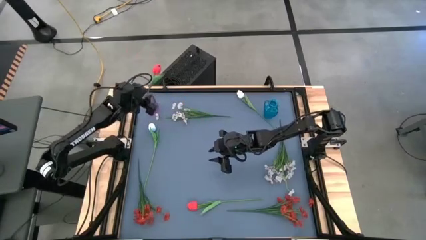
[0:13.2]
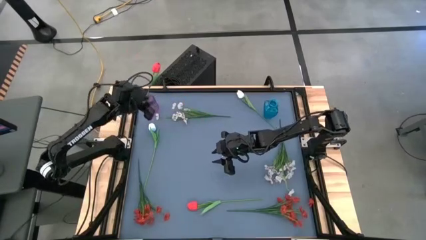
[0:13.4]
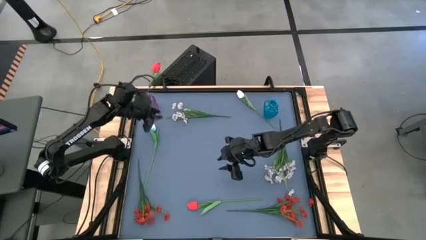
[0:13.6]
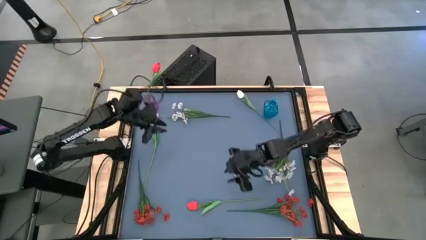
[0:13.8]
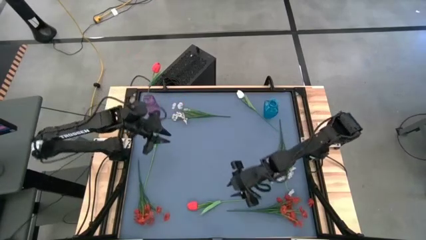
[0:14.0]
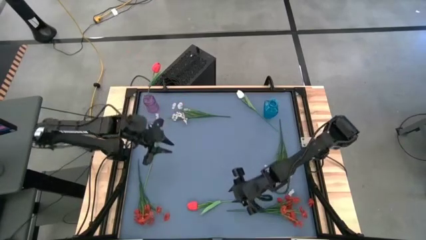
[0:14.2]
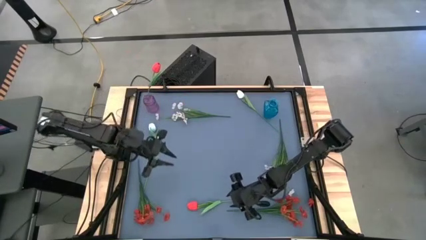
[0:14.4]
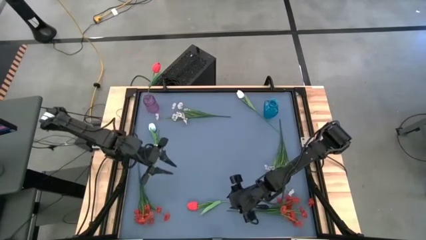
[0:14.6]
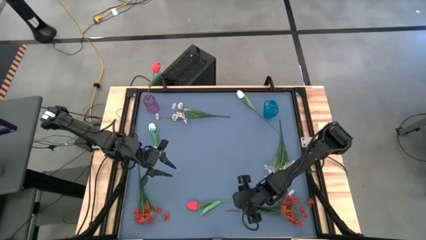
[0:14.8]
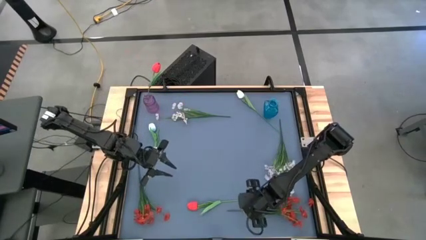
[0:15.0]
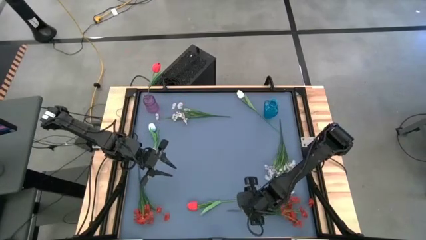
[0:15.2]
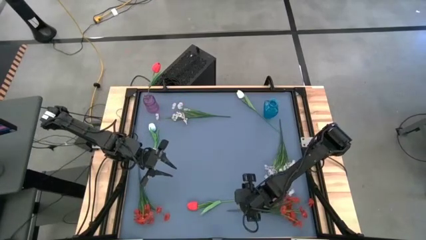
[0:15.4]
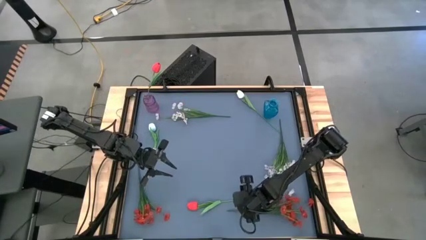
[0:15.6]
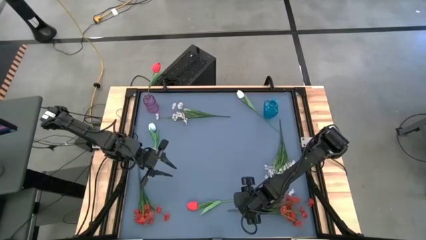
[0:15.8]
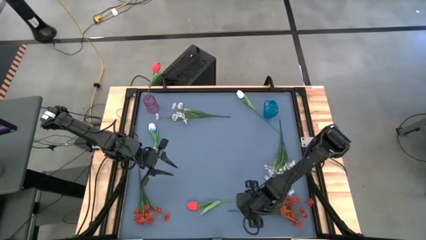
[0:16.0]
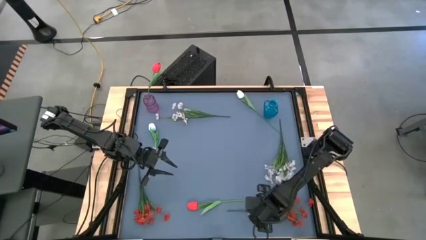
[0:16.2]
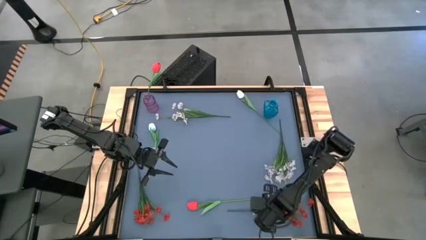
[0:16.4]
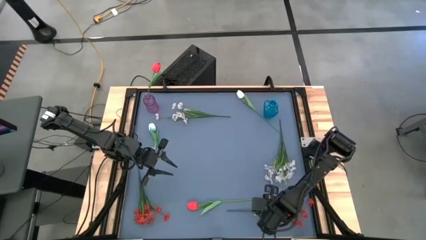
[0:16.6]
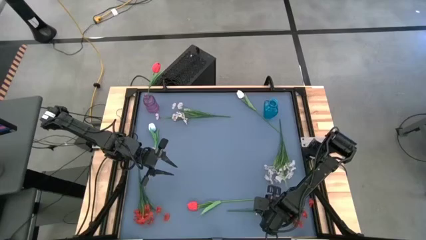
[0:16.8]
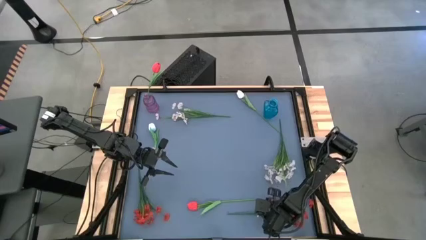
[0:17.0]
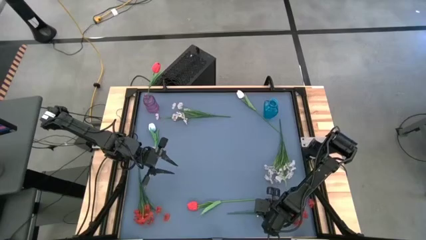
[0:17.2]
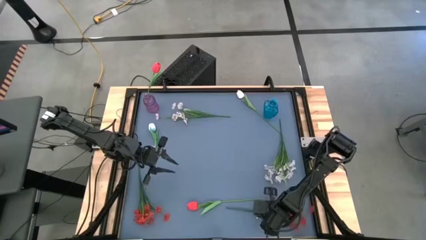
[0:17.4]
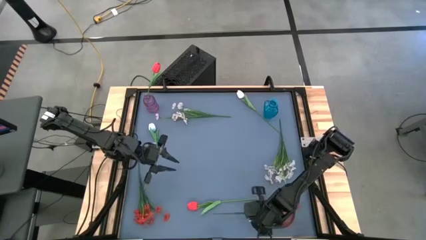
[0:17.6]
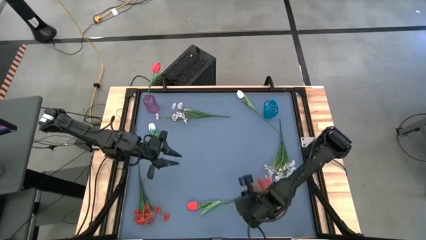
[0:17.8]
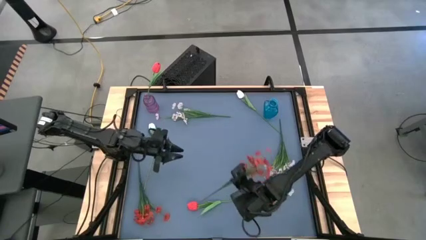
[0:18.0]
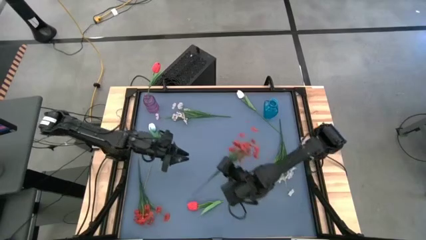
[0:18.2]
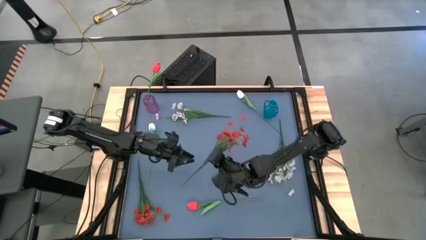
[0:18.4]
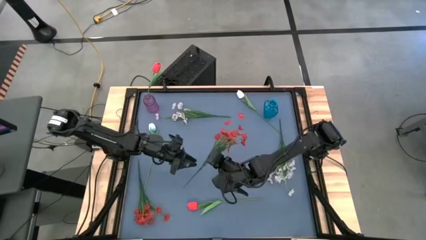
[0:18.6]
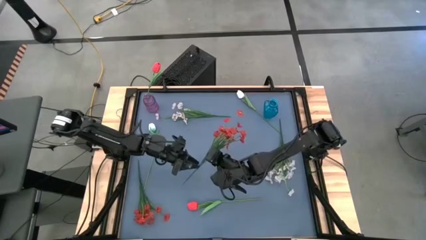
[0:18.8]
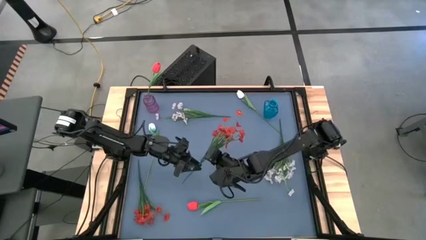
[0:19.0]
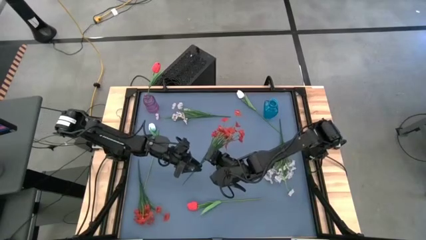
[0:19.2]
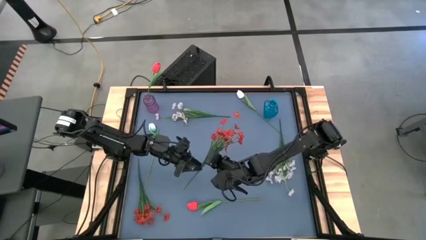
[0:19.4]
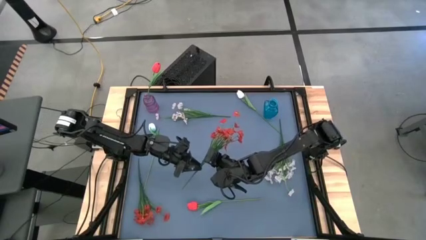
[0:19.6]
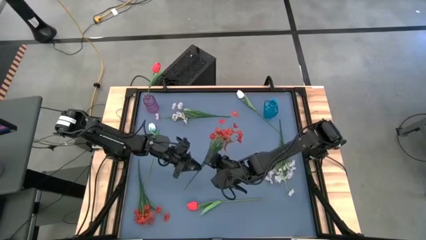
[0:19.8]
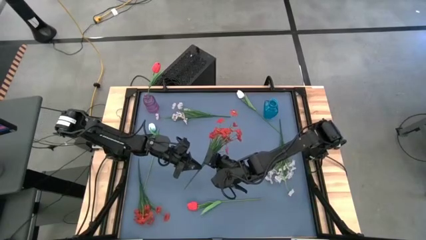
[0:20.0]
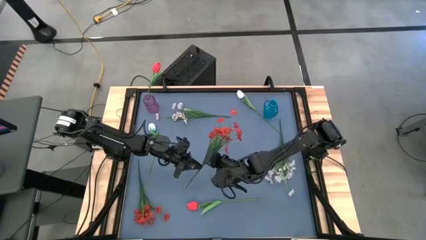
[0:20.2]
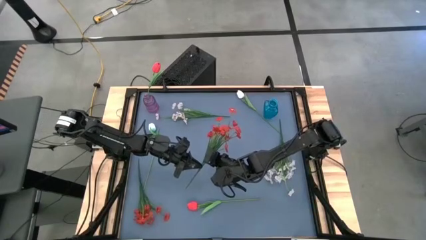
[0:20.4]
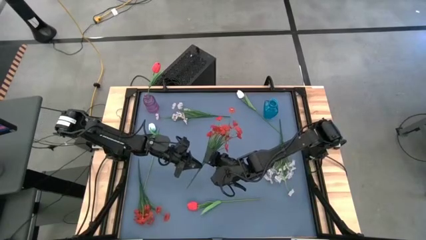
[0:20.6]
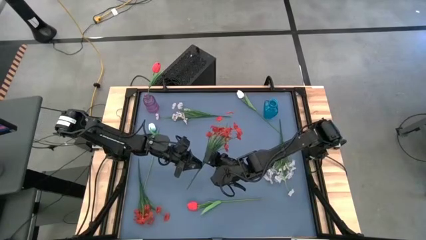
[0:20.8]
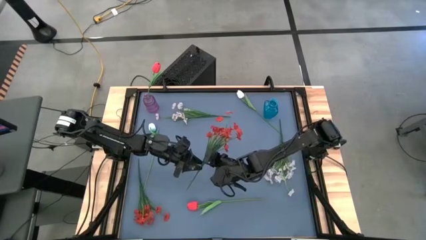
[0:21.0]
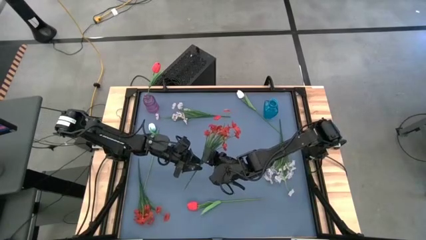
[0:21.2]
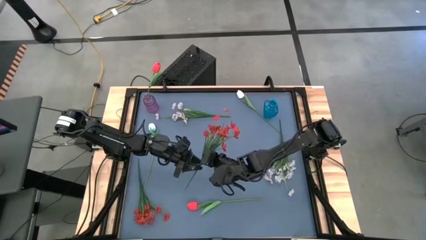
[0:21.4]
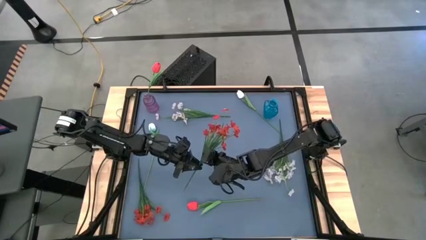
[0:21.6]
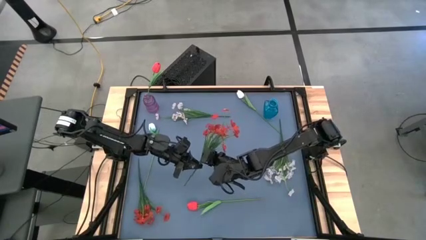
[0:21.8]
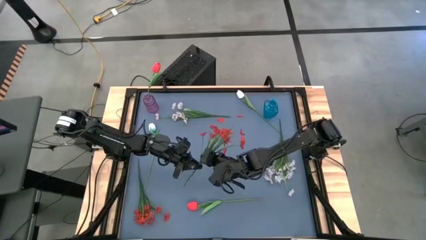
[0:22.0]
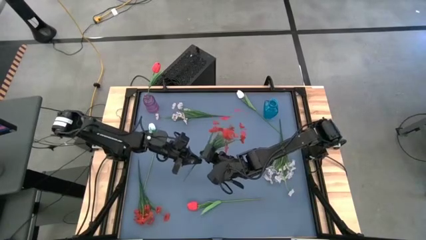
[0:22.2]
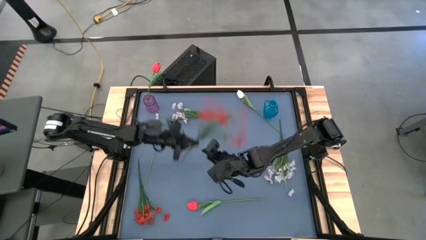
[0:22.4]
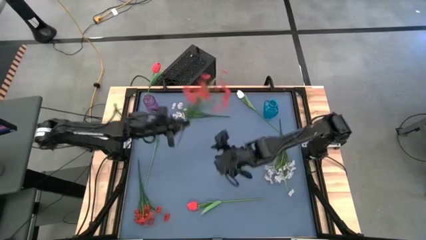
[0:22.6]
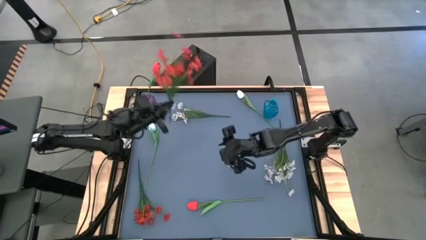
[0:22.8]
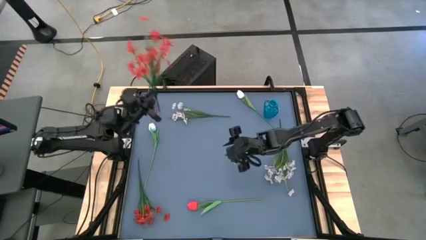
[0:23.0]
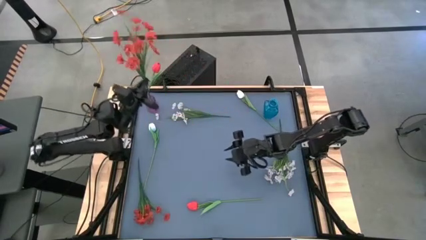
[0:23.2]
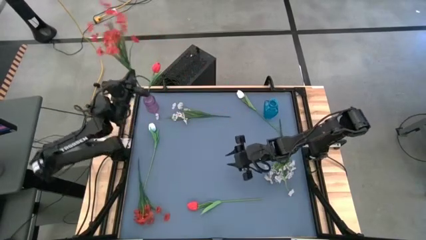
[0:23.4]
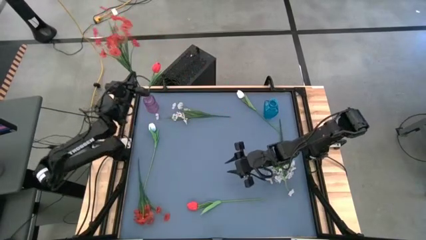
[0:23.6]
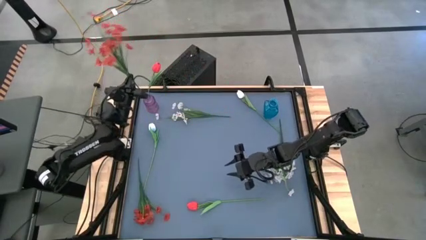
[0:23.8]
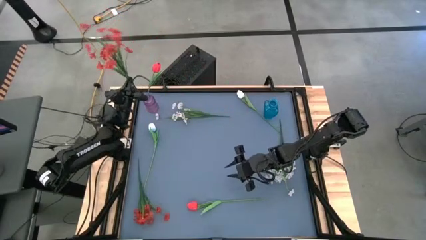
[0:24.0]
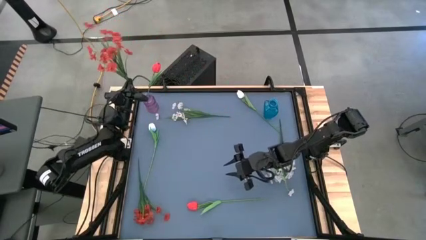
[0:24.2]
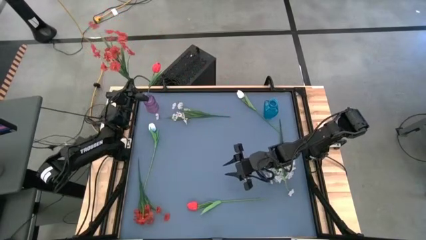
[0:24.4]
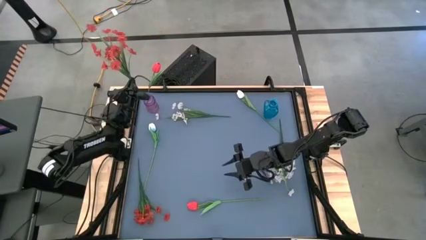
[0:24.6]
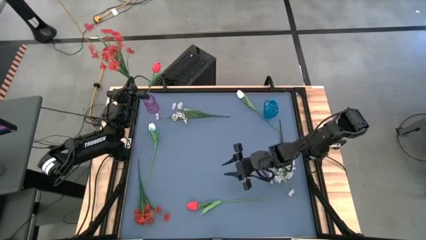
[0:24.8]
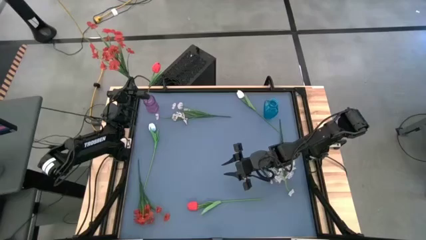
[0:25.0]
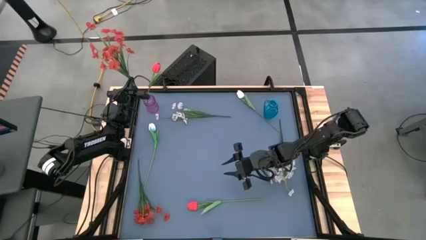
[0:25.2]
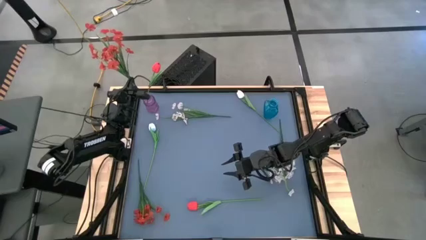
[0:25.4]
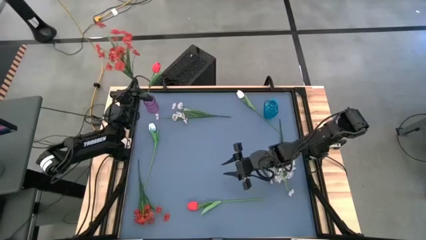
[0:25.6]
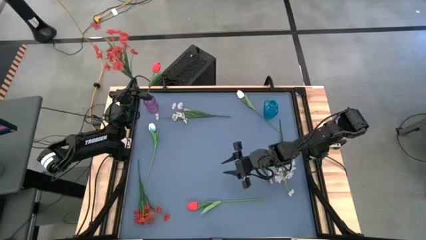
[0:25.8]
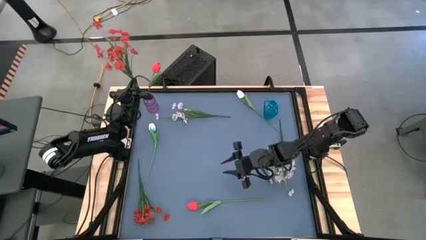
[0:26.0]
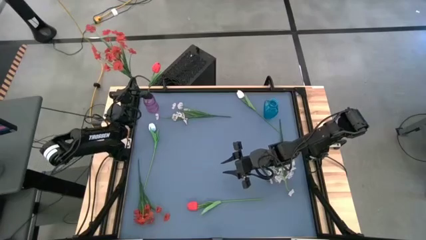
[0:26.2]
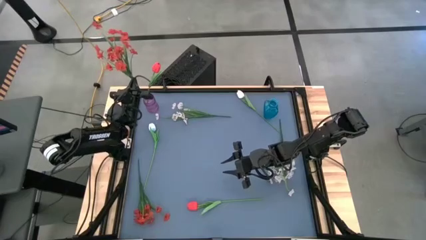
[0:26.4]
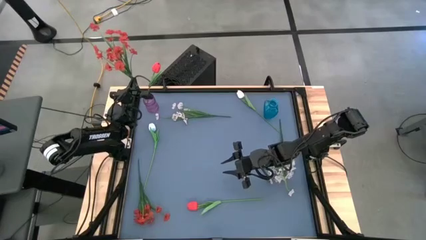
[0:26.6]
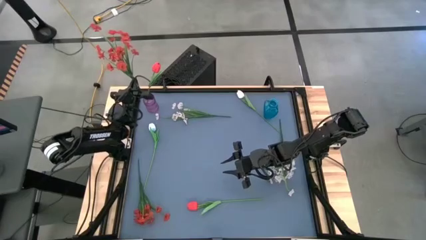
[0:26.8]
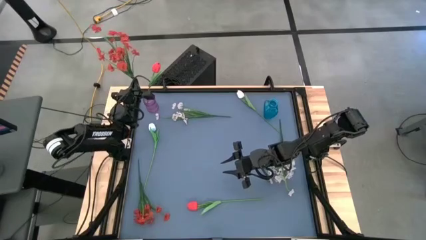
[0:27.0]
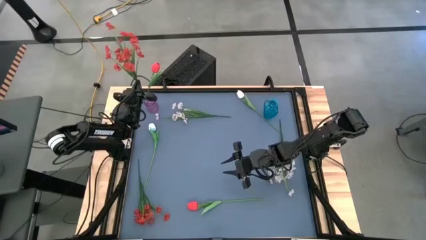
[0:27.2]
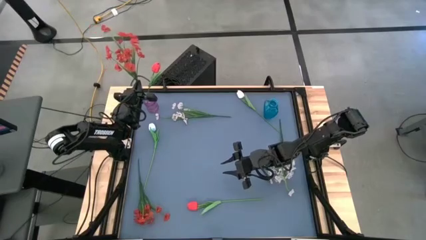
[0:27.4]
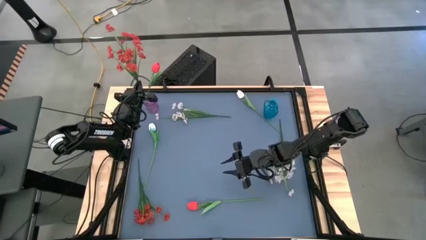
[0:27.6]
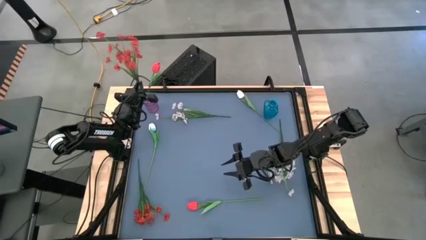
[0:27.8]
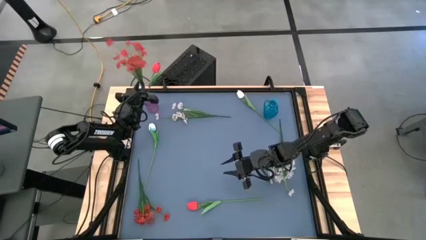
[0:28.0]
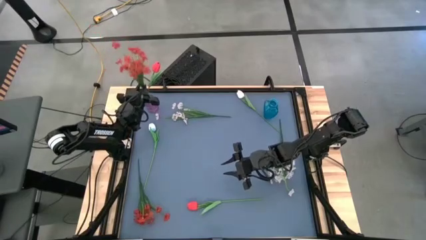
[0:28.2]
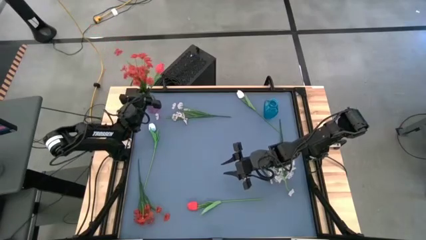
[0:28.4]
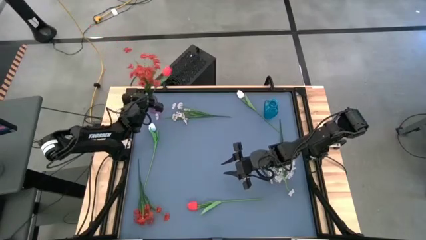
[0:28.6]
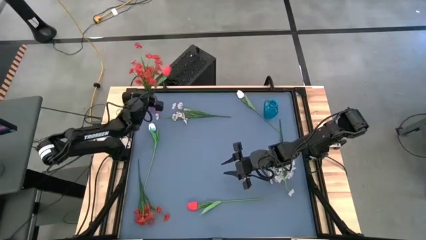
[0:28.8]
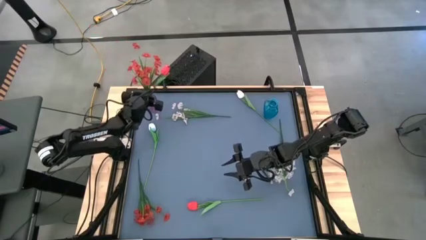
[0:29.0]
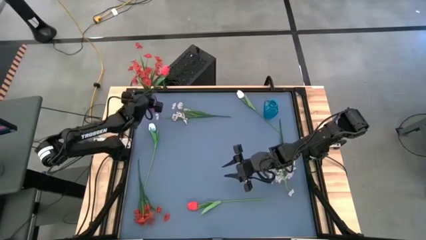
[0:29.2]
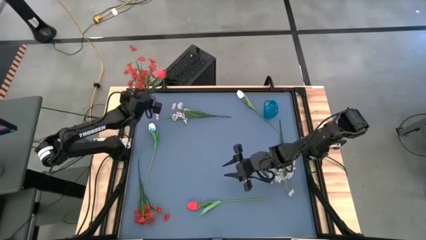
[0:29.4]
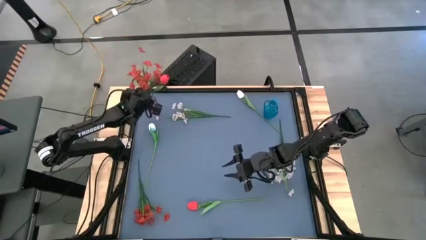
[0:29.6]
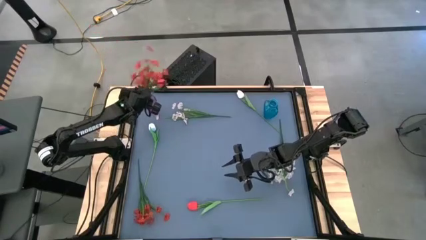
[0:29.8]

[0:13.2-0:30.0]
Task: Sort flowers into vase by color
Put the right red flowers into the violet vase
